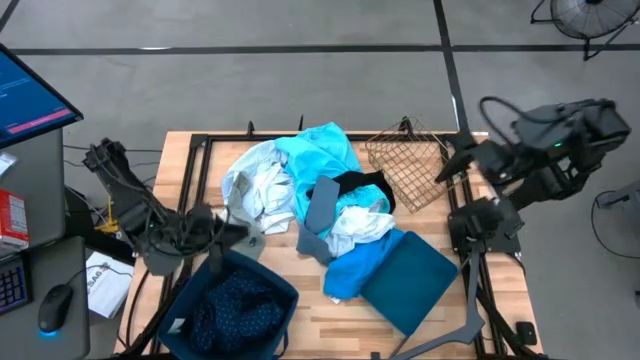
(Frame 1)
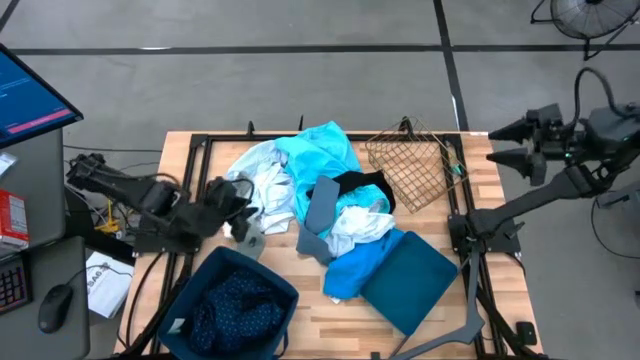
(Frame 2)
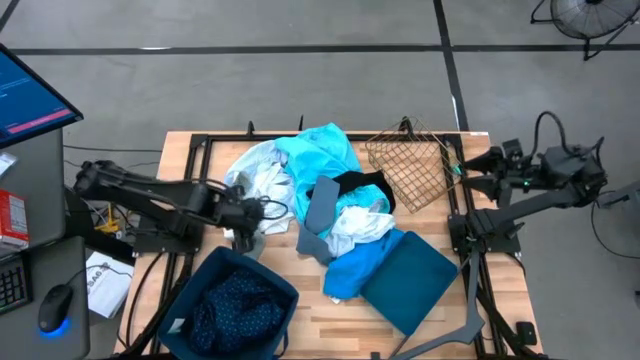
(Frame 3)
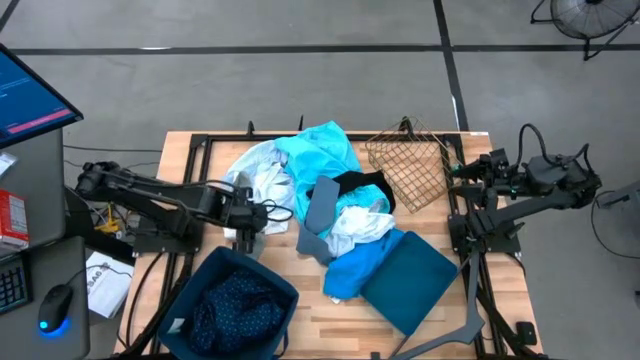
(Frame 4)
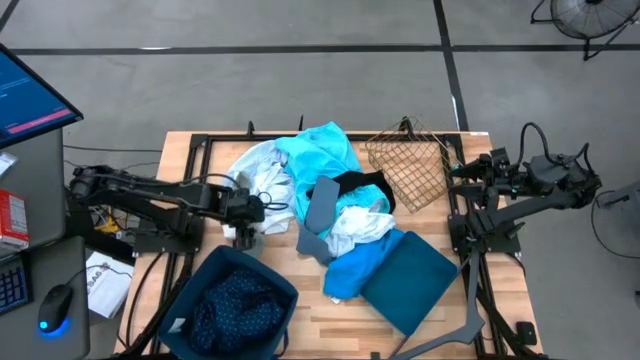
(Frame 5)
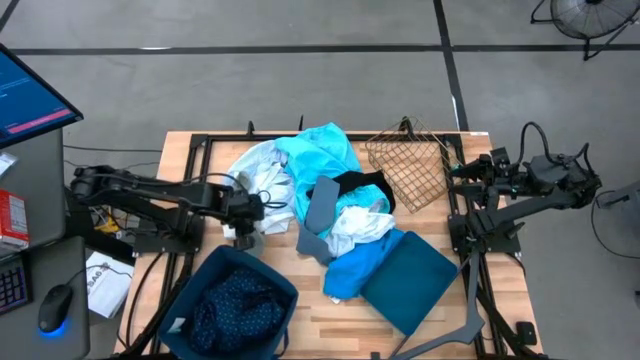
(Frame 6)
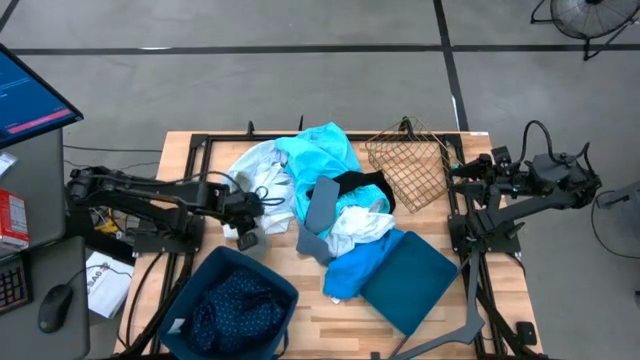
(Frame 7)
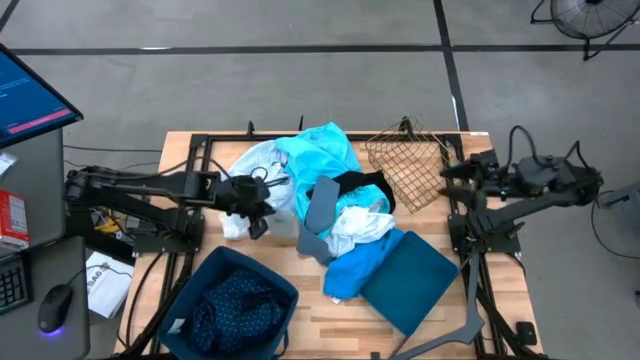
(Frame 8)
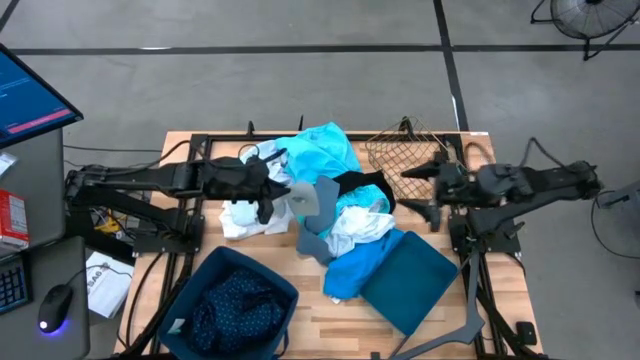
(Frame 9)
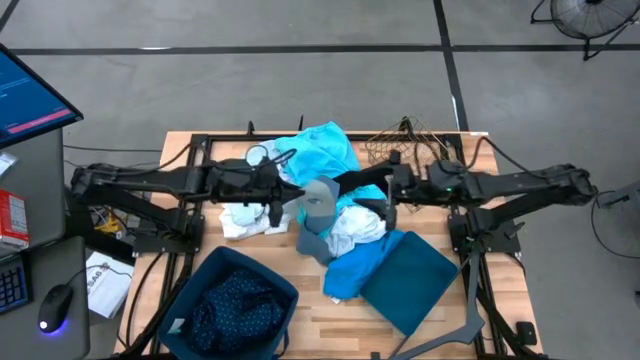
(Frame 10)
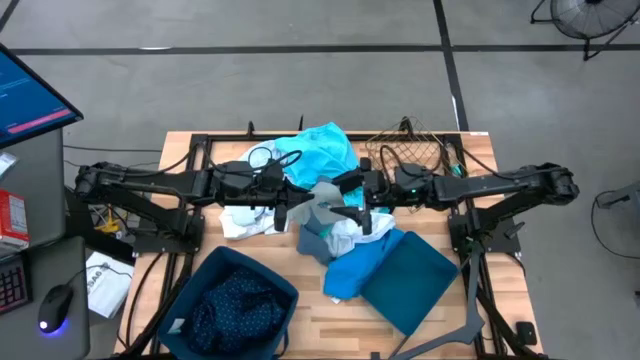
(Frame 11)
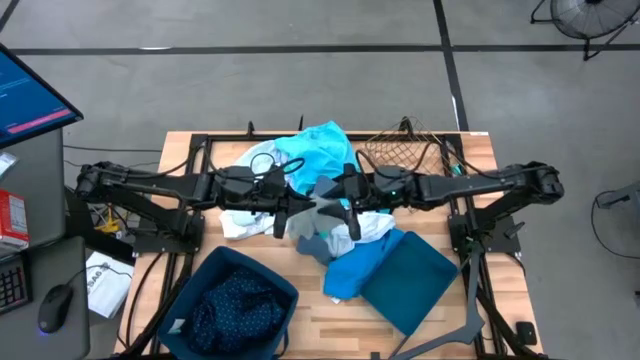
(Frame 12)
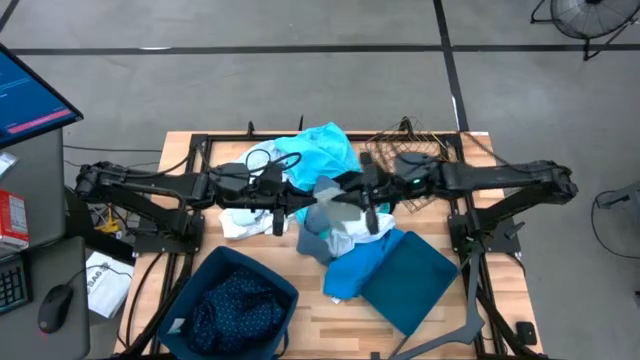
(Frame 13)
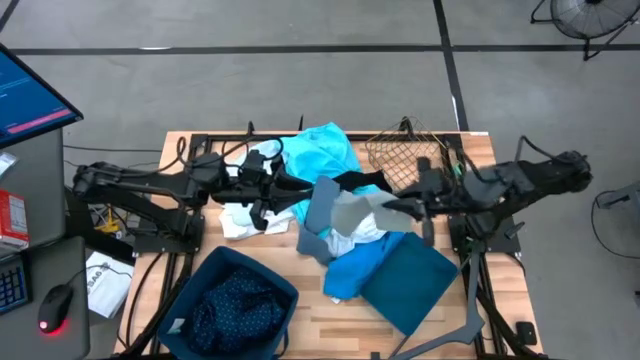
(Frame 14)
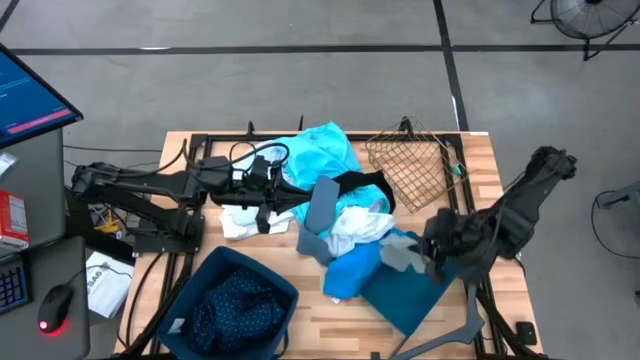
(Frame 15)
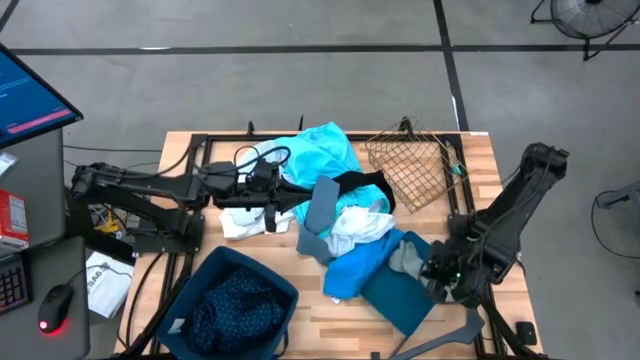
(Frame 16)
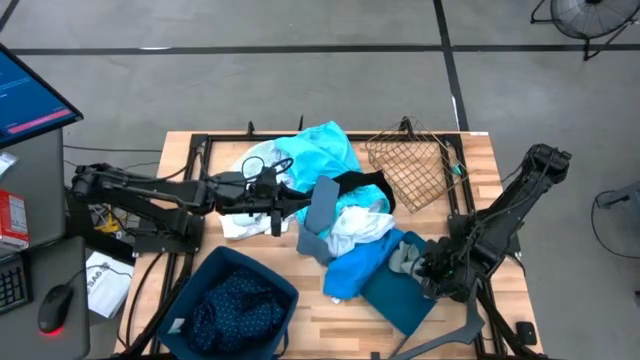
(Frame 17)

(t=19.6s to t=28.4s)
Task: Pick & Place Cloths
Put the light brown sock into the blue bin

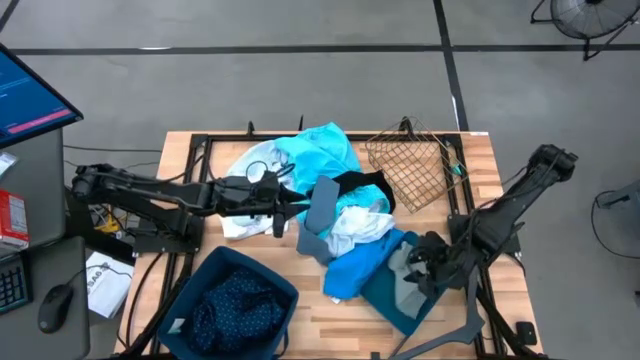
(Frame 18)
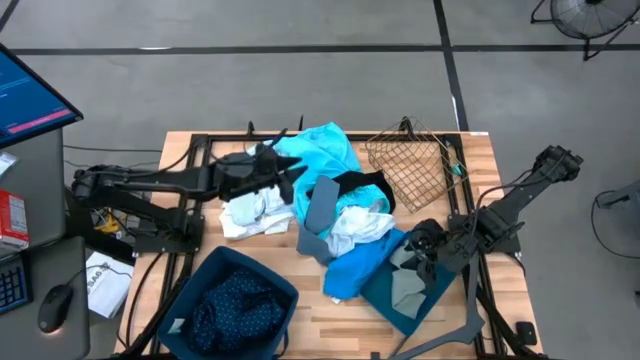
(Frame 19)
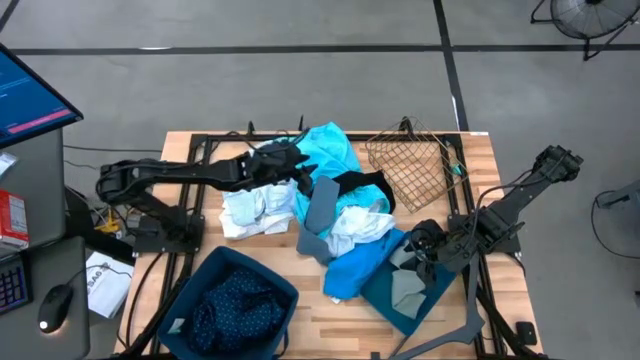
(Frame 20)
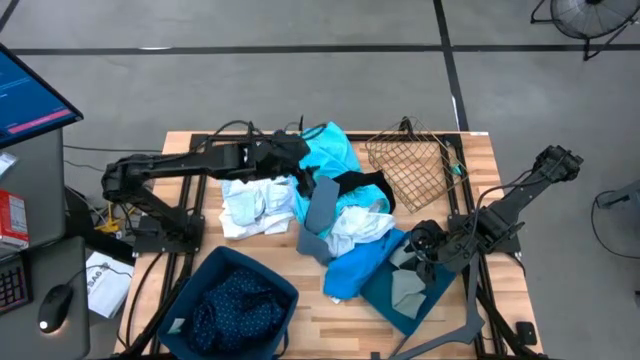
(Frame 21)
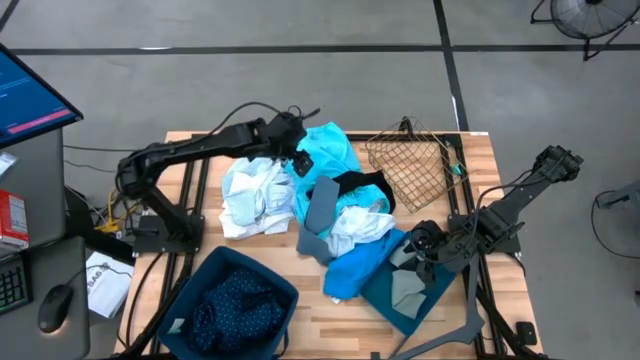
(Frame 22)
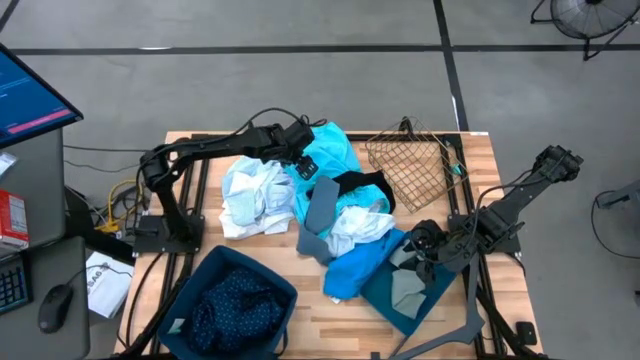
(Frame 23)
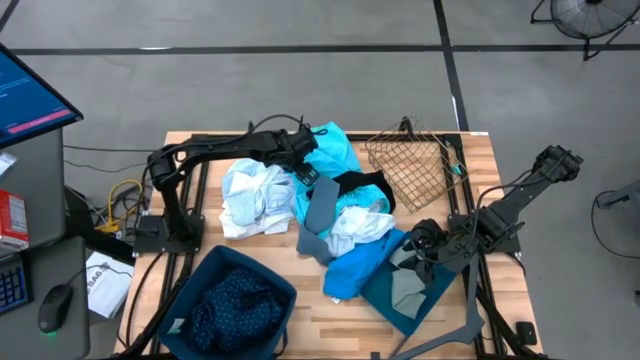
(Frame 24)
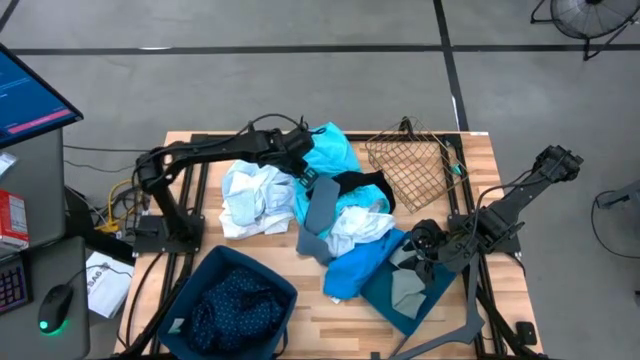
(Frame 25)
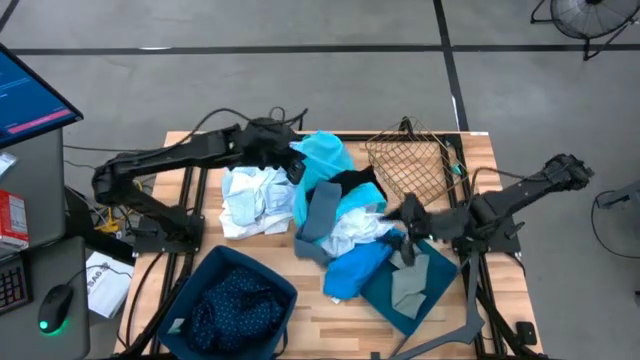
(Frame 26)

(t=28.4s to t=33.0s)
Put the light blue swim shorts into the wire basket

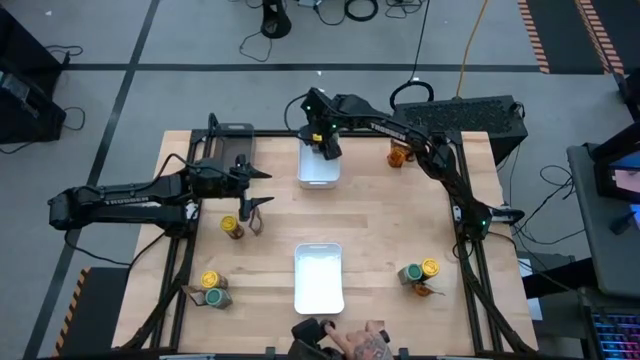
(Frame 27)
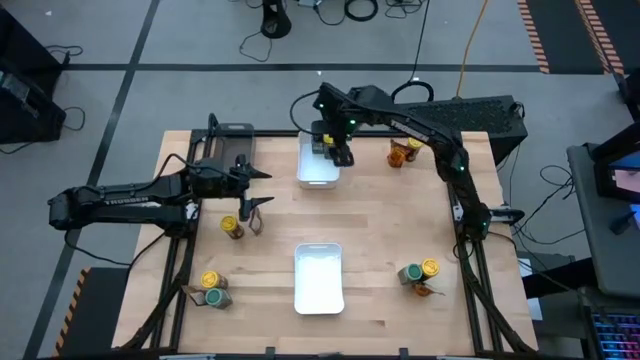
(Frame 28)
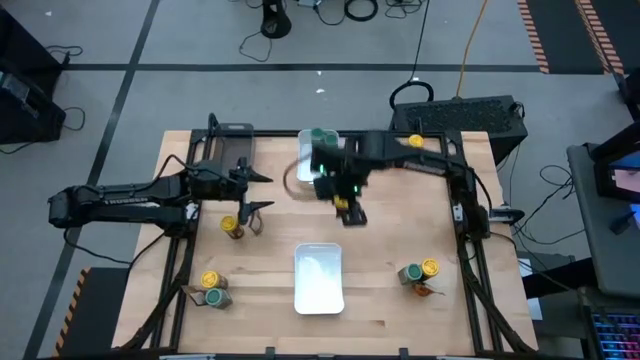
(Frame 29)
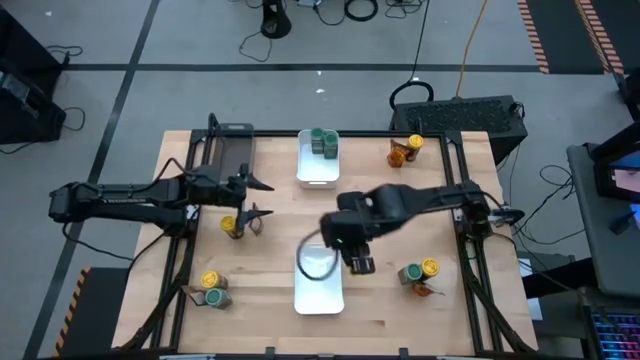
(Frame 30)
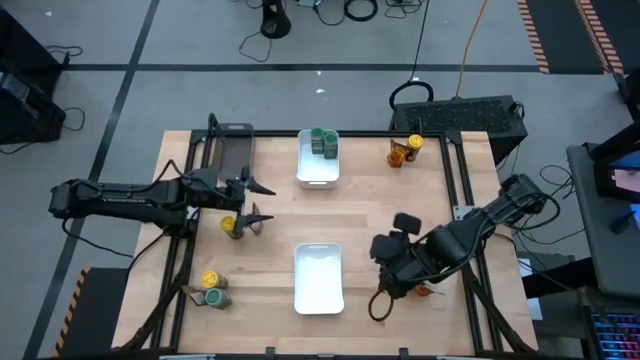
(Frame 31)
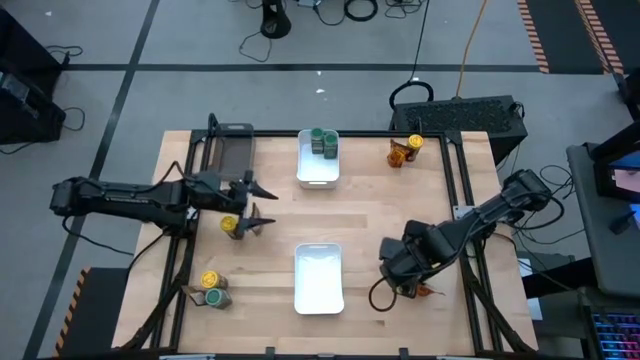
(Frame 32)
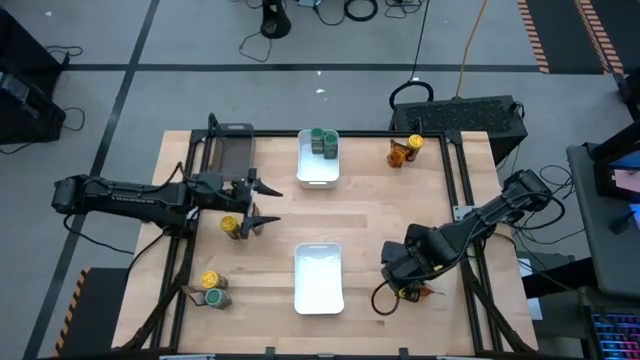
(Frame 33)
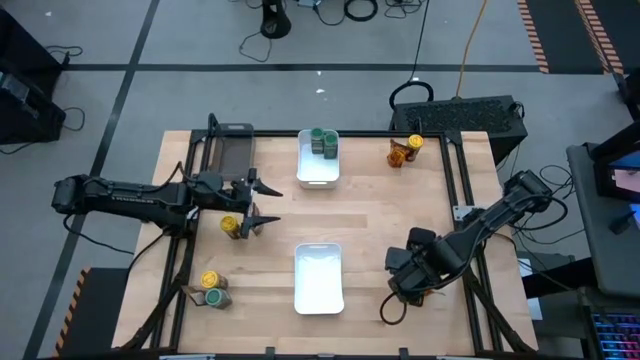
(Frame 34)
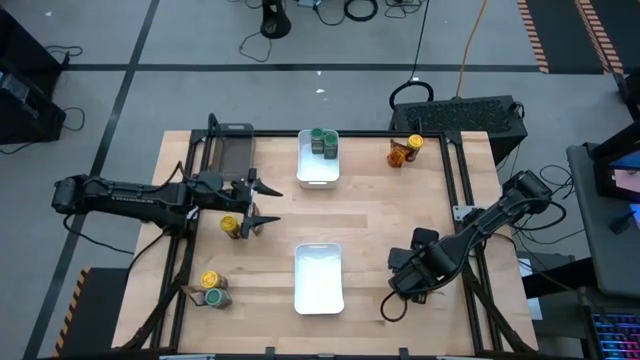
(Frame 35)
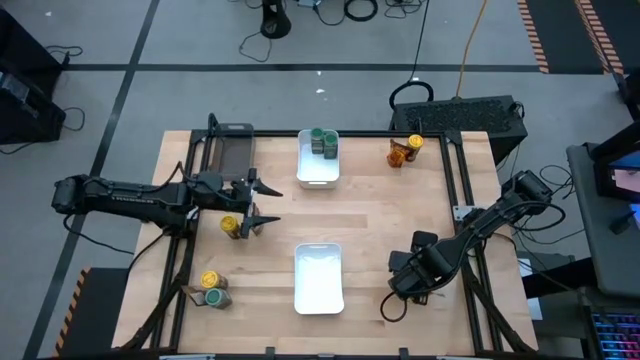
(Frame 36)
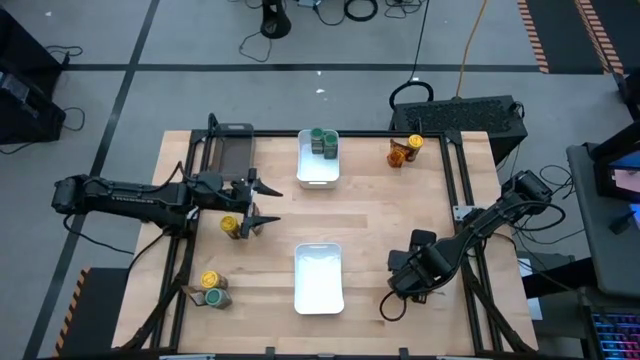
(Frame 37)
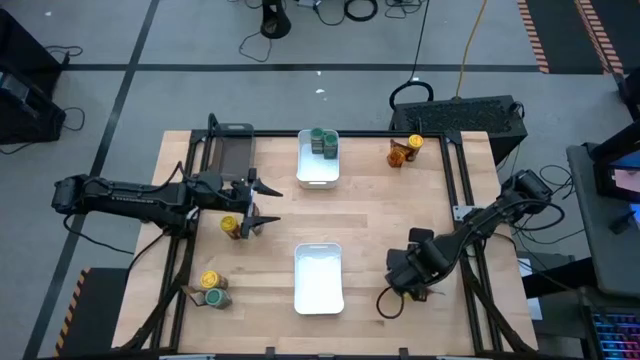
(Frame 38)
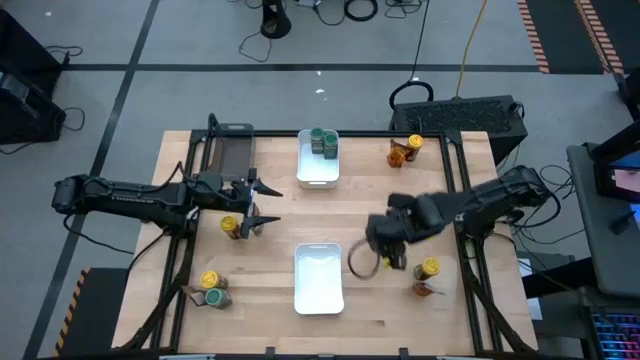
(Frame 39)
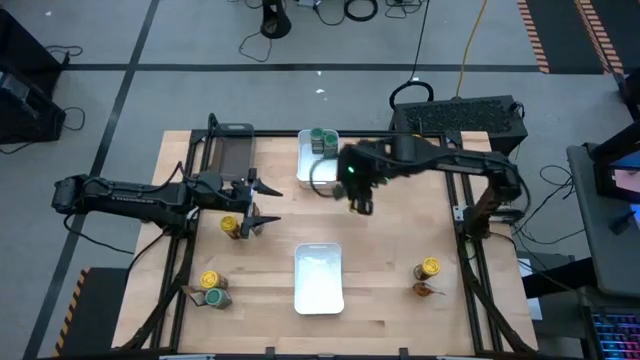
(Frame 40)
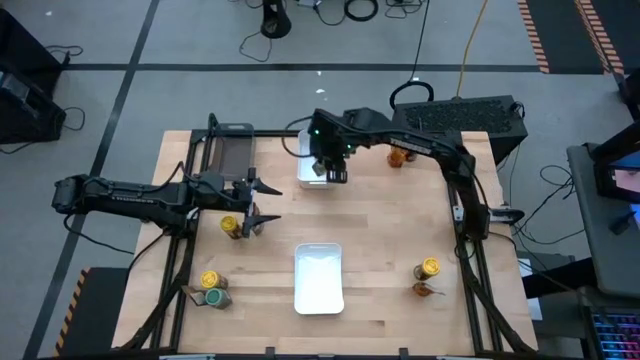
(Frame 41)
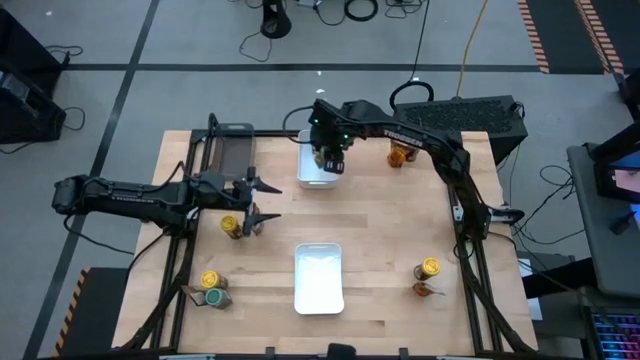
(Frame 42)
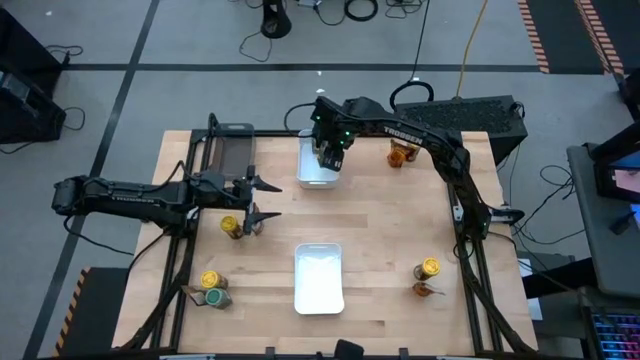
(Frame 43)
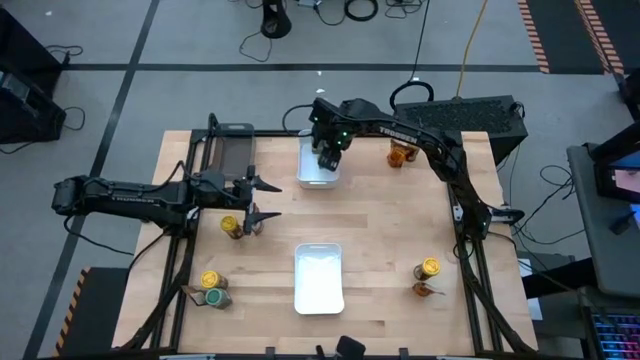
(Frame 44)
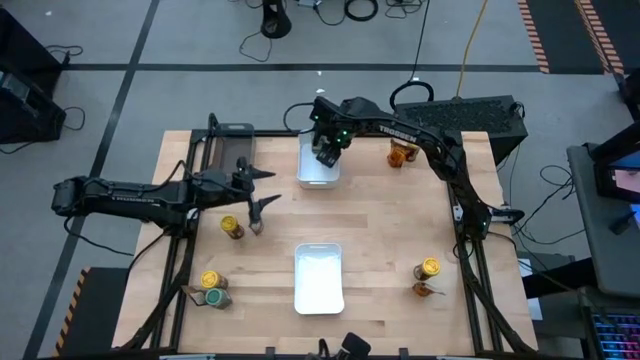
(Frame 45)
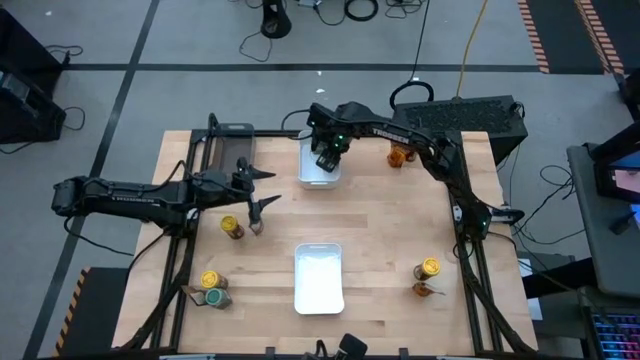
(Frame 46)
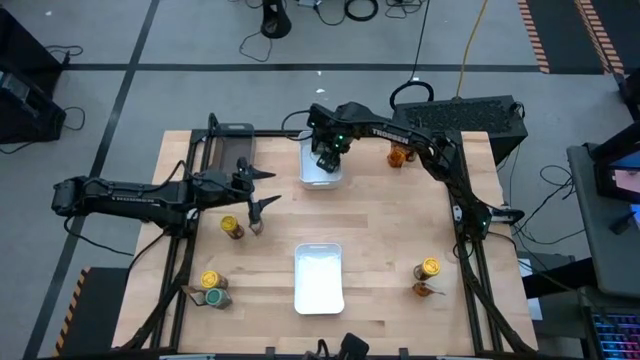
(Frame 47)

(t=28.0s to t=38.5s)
Task: Sort spices by type
Put the right green spice bottle into the top white bin
